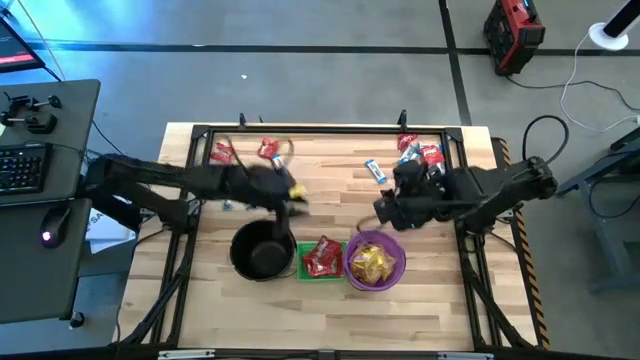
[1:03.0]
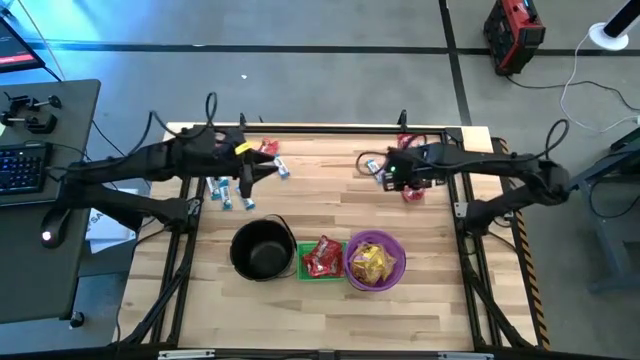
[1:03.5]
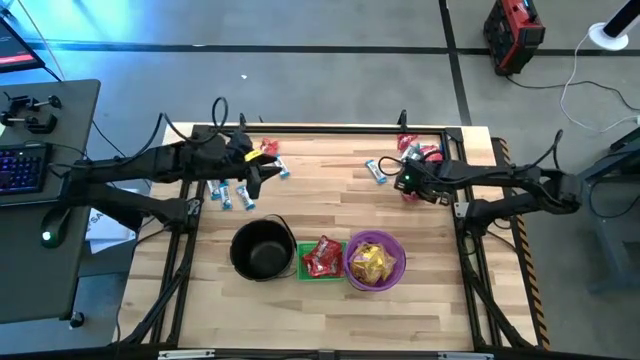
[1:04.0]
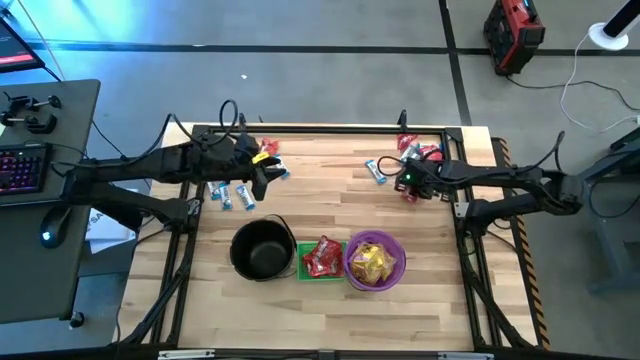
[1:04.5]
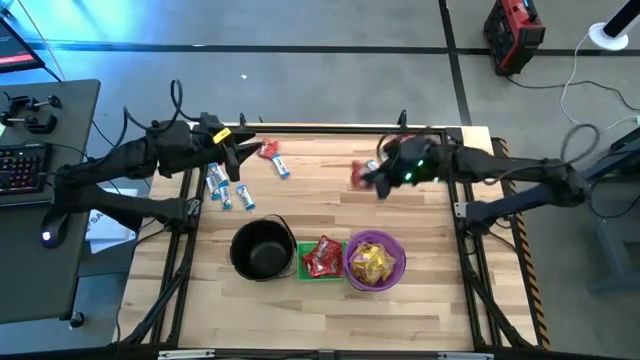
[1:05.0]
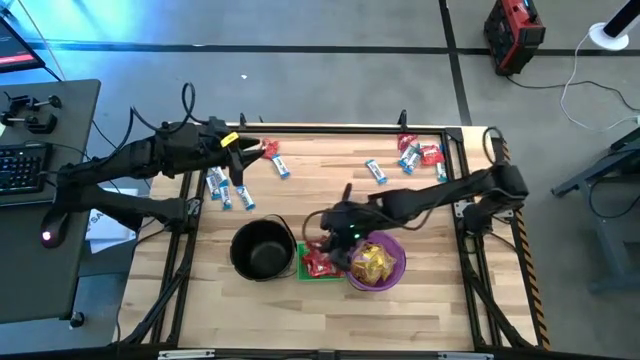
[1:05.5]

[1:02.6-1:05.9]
Task: Sort candy by brand, put in halloween buckets
Put the red candy into the green bin

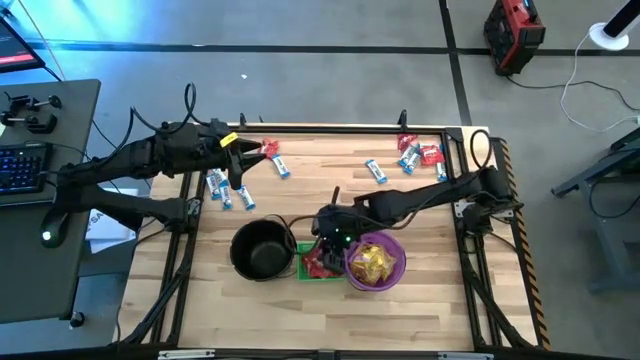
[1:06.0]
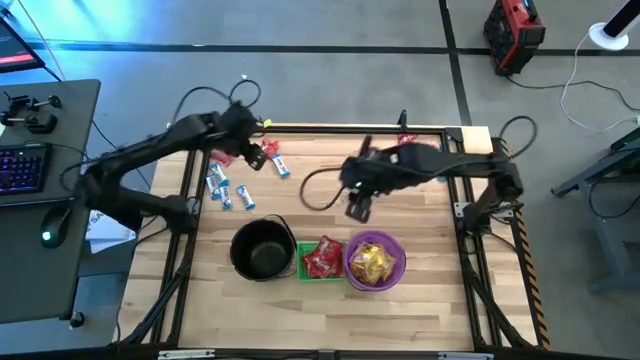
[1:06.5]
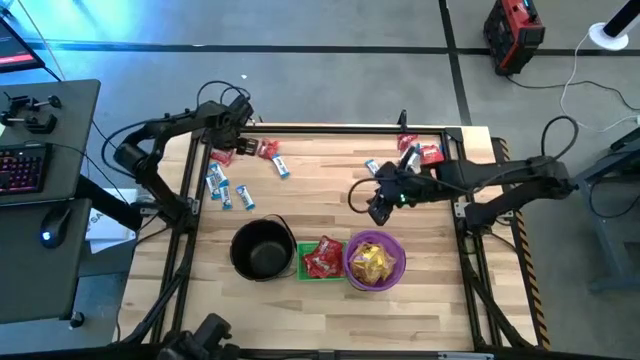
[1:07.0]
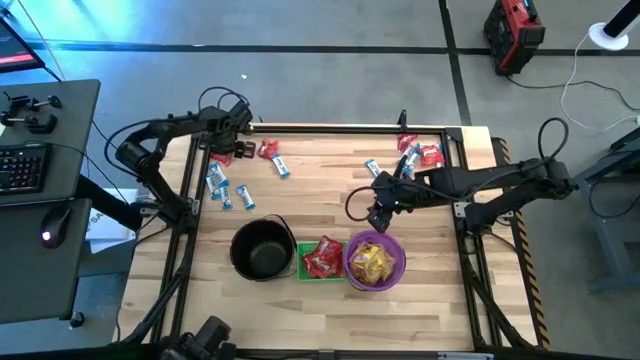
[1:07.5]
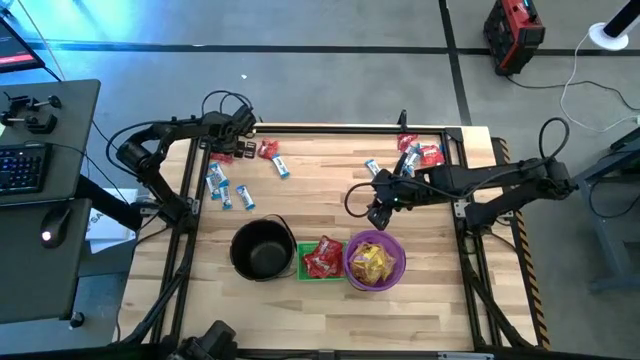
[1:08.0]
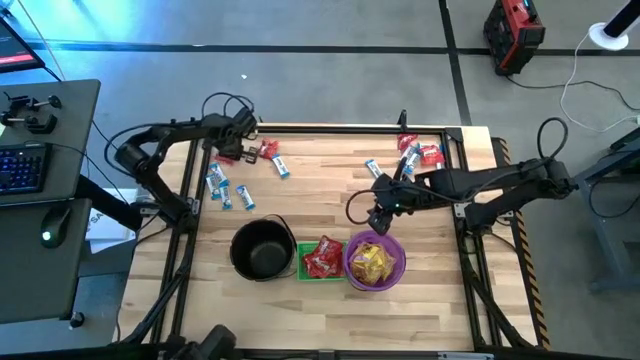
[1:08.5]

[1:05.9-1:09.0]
Put the red candy into the green bin

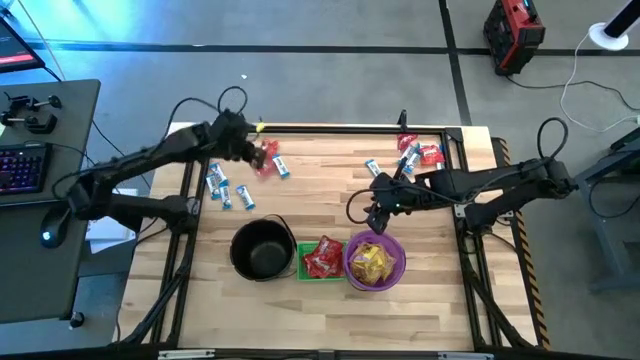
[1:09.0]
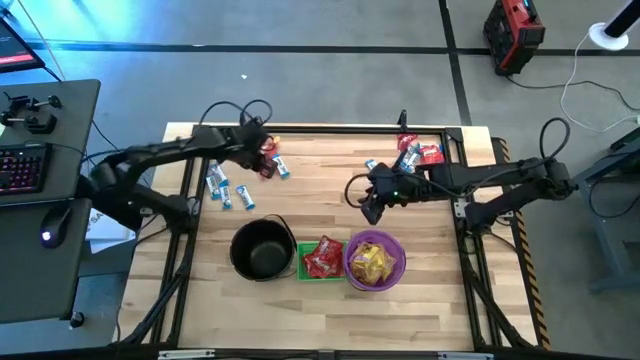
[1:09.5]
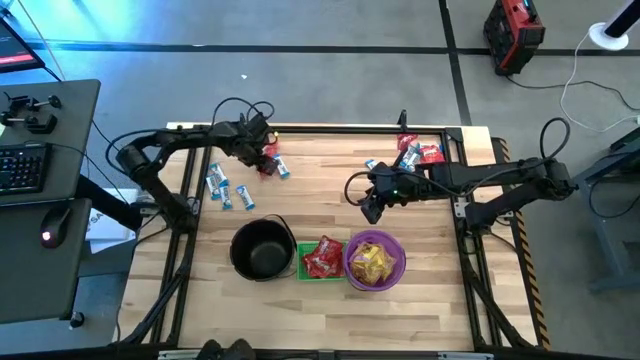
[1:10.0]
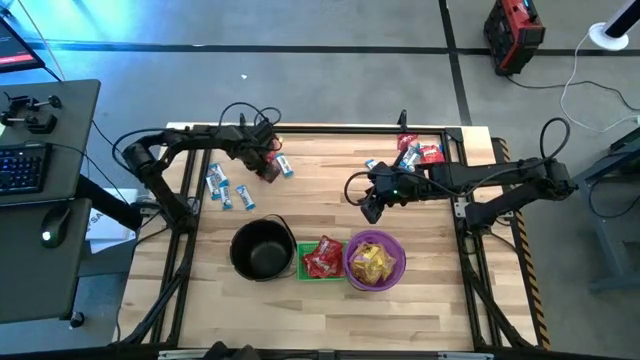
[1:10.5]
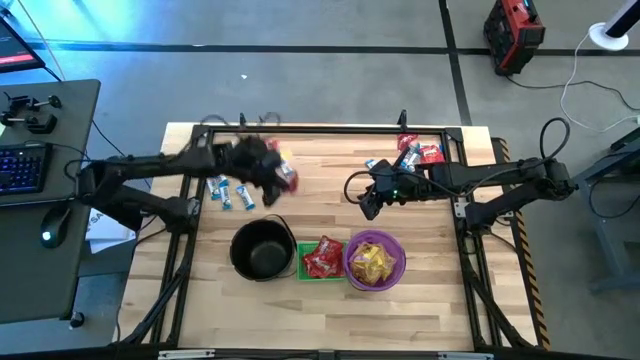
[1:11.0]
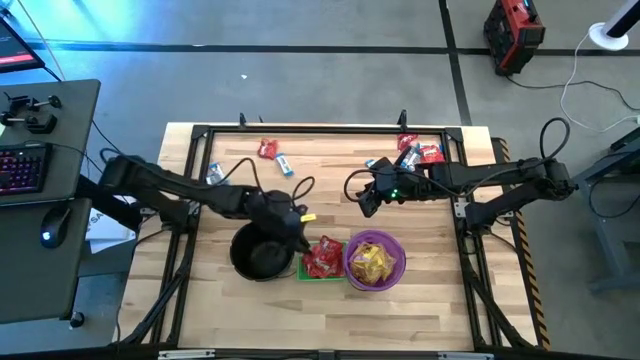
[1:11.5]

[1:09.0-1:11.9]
Put the red candy into the green bin

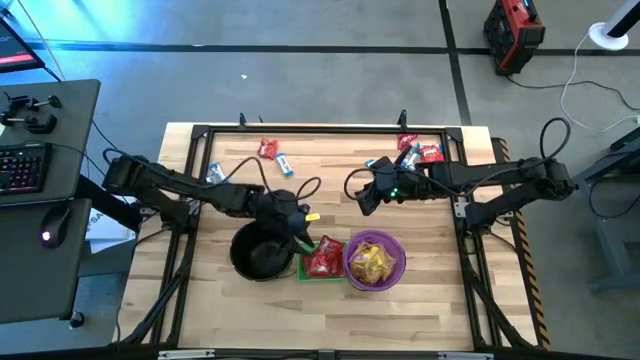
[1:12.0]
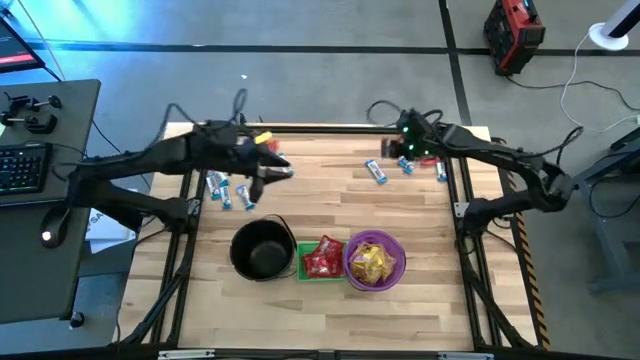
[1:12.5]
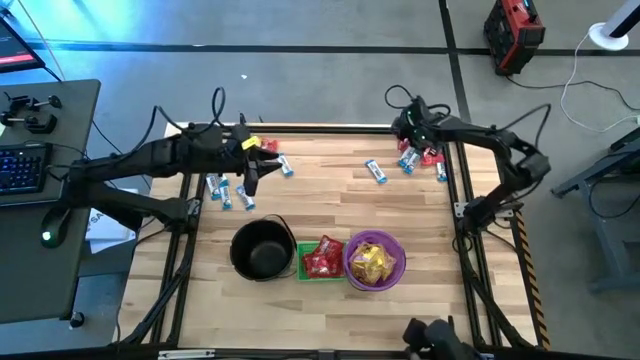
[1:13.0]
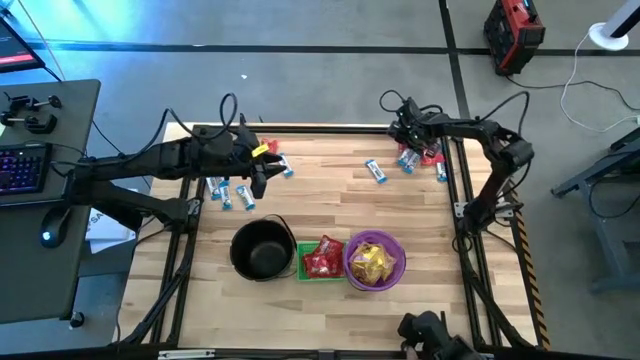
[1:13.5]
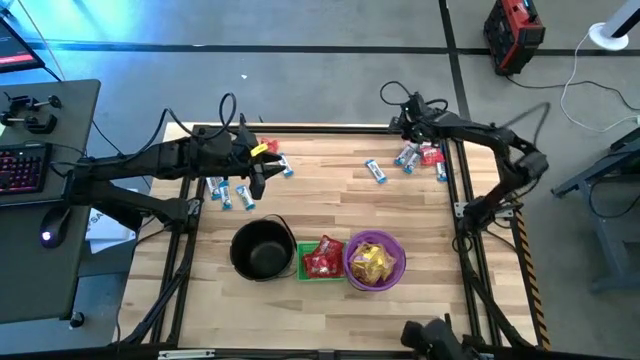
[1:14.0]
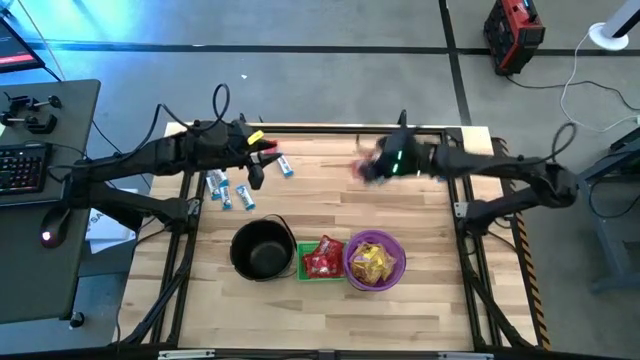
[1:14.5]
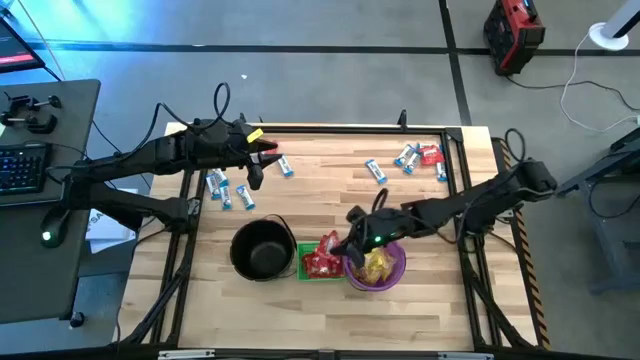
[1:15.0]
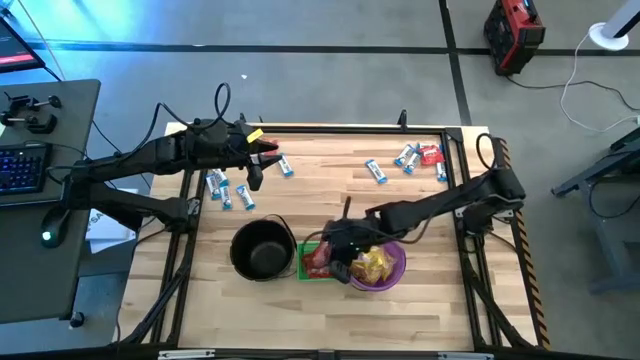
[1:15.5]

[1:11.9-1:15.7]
Put the red candy into the green bin

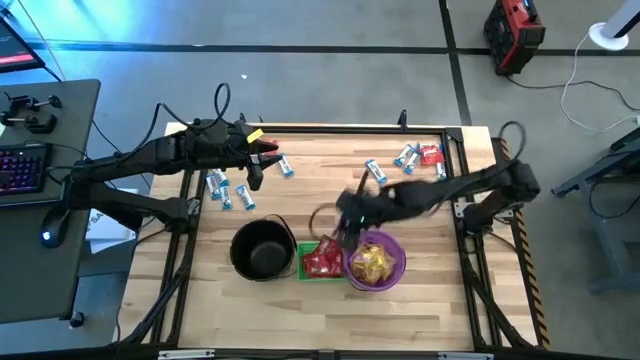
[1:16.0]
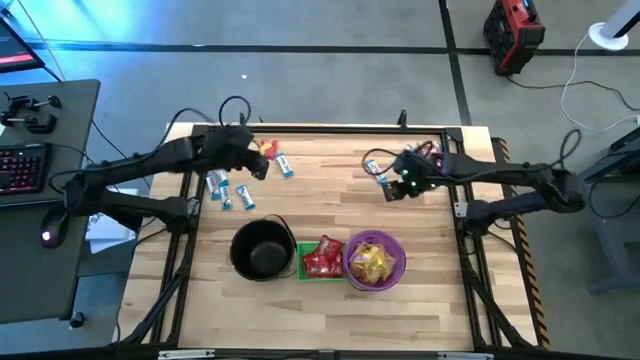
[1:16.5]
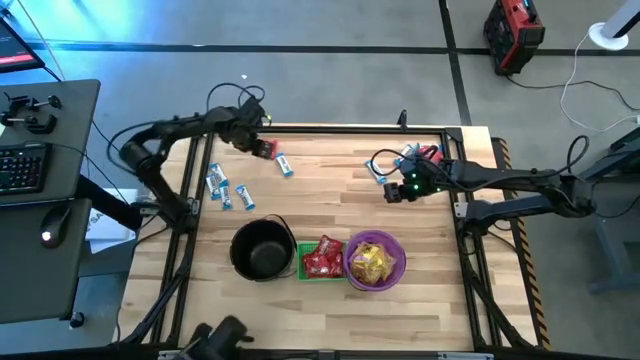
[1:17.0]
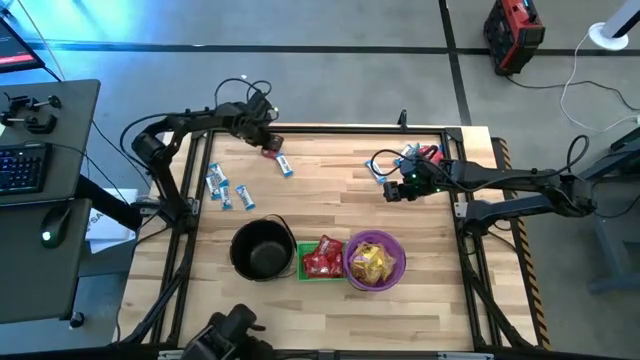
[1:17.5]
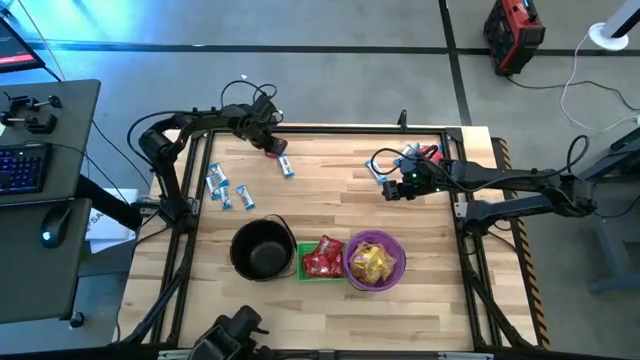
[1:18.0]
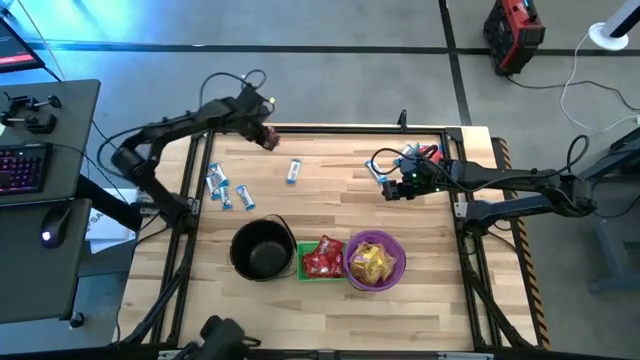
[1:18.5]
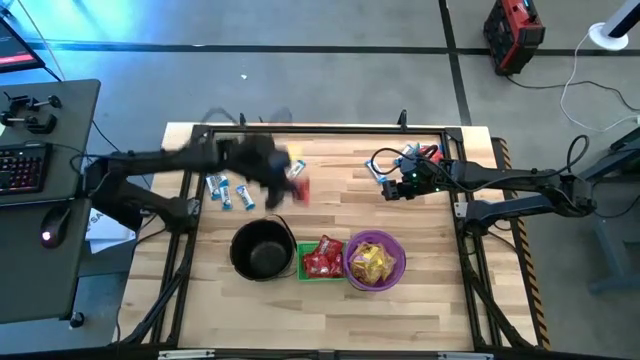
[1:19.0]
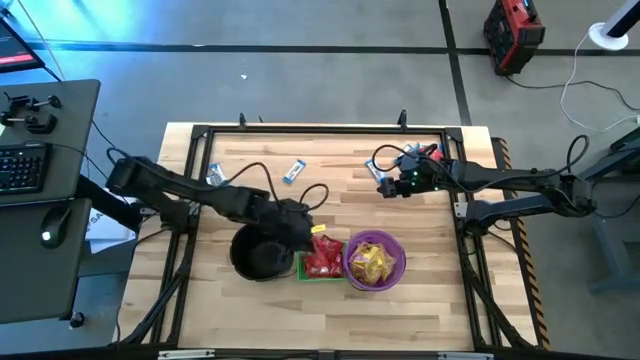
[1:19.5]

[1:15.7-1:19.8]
Put the red candy into the green bin

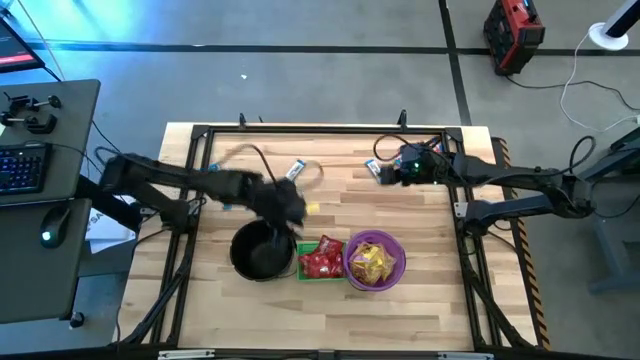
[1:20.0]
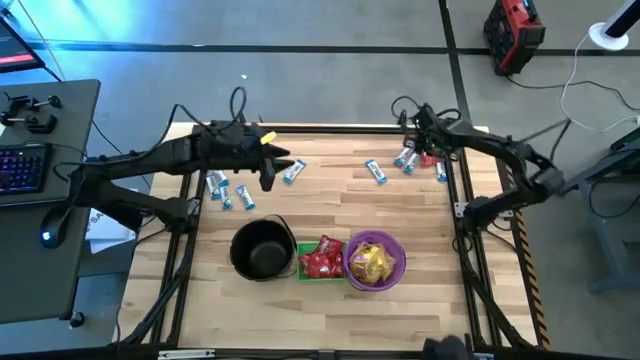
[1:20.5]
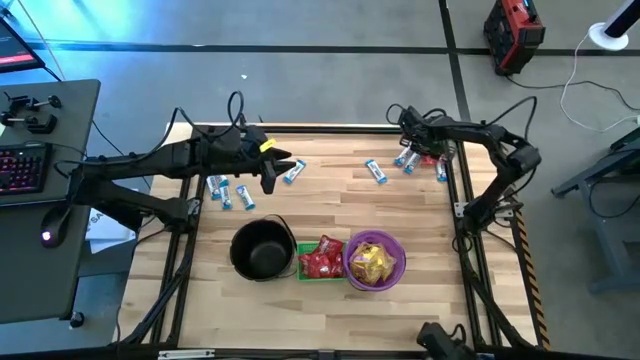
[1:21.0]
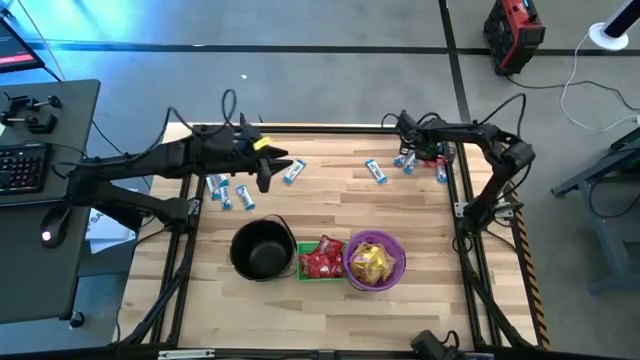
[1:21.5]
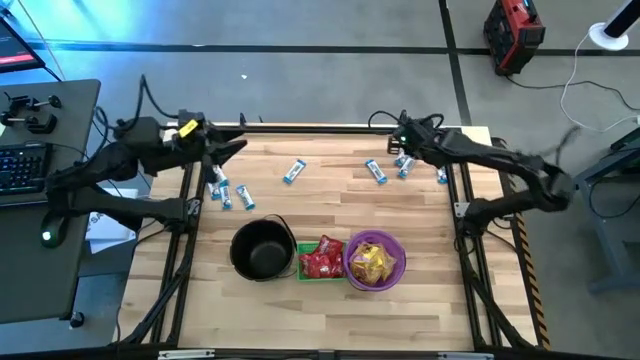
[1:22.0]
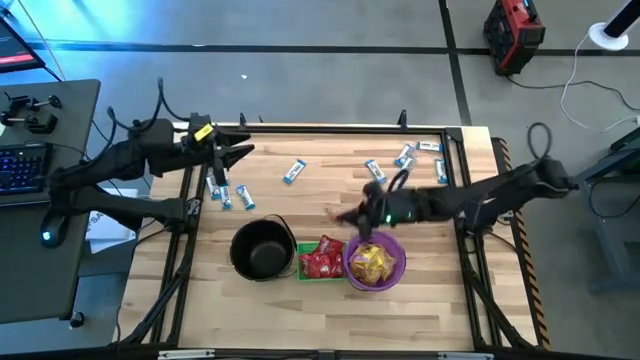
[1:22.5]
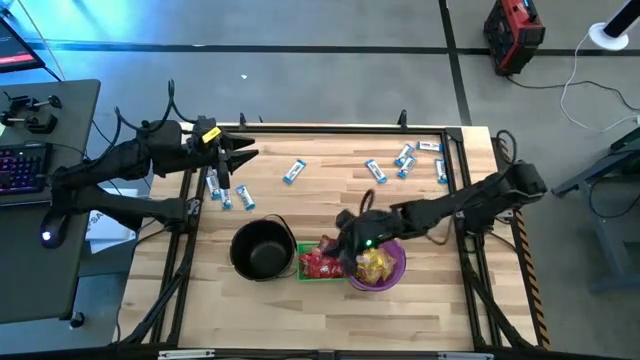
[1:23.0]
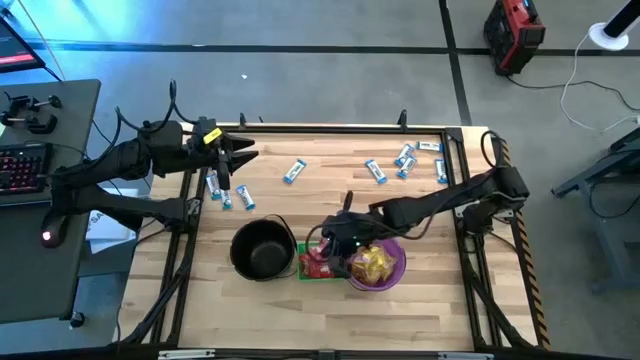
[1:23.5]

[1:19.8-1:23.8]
Put the red candy into the green bin

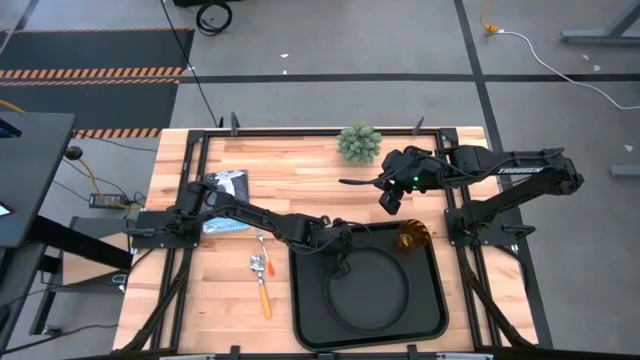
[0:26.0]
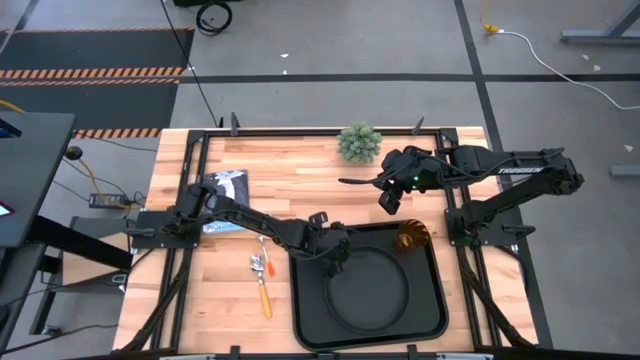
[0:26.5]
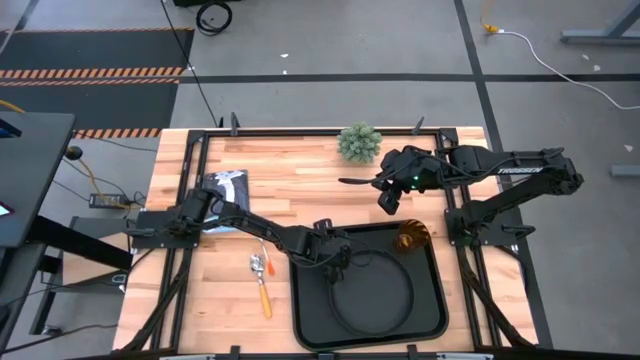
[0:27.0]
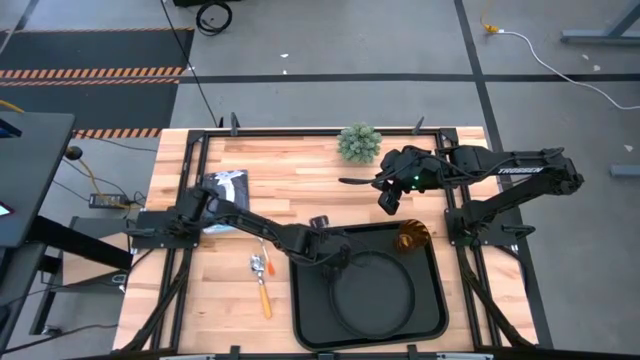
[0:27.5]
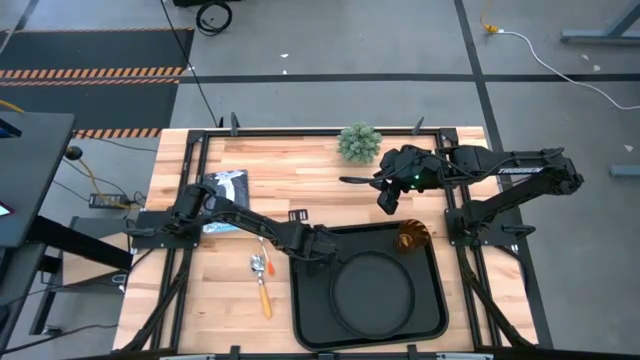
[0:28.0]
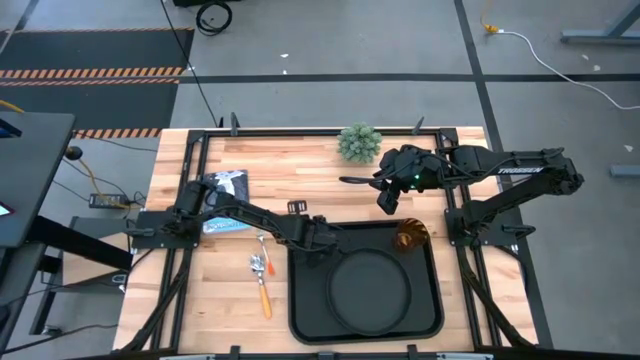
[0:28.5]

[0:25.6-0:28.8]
Task: Pick and place plate/cup/fork/spoon on tray
Adjust the black tray
